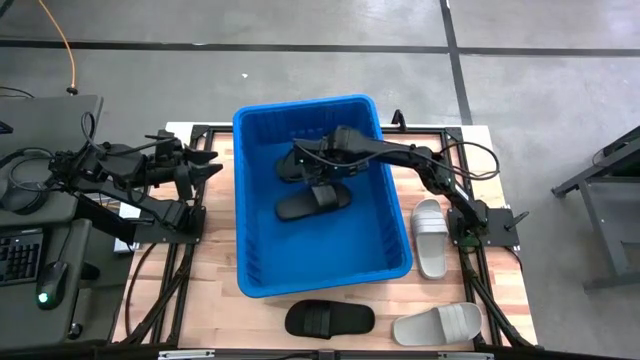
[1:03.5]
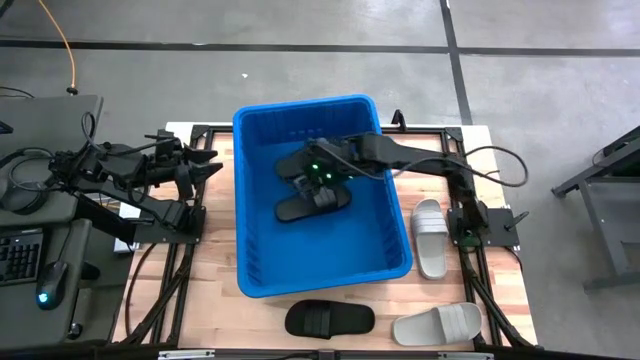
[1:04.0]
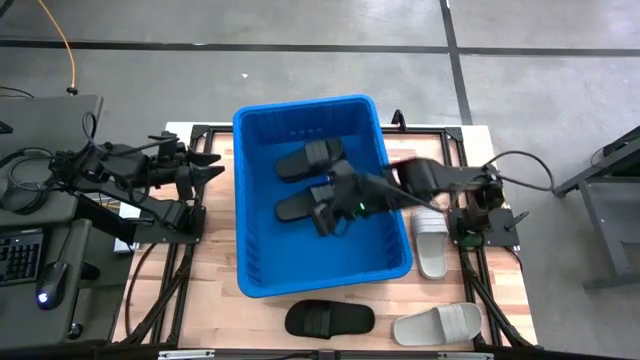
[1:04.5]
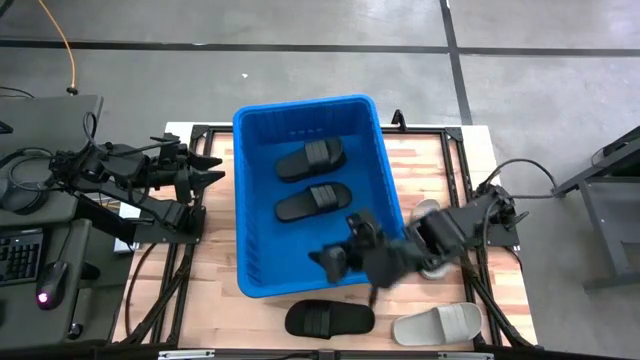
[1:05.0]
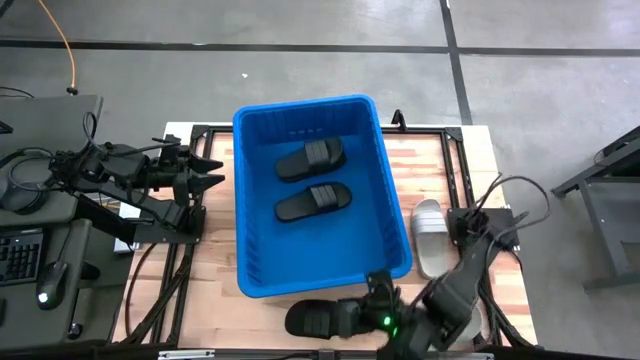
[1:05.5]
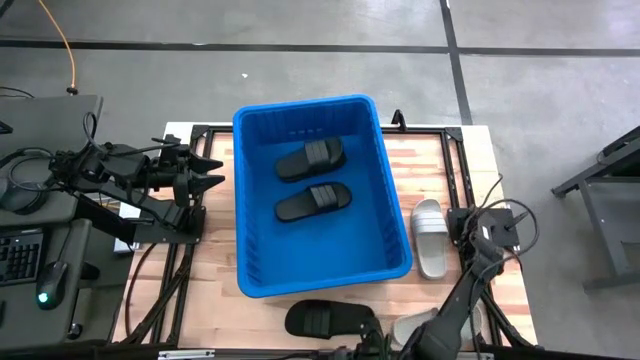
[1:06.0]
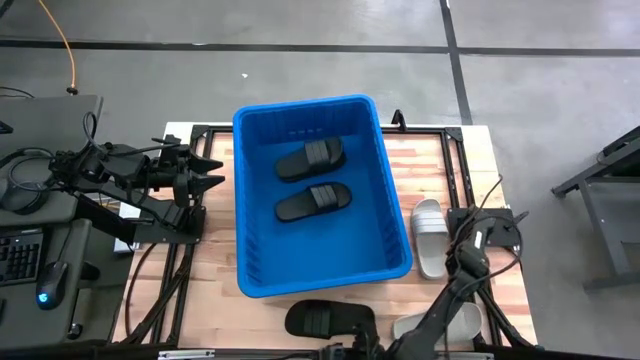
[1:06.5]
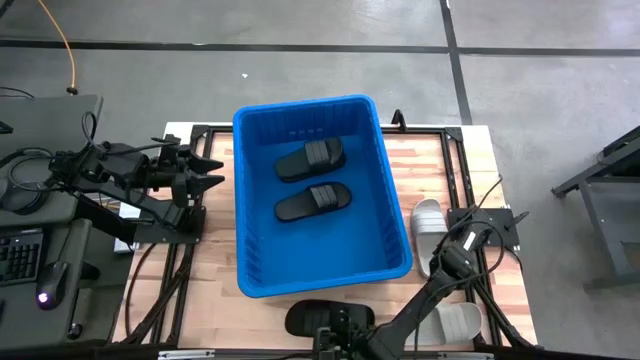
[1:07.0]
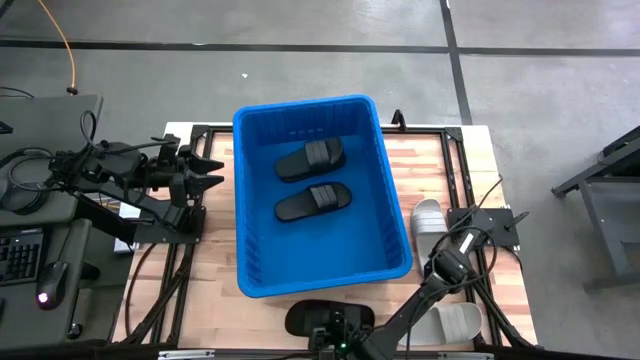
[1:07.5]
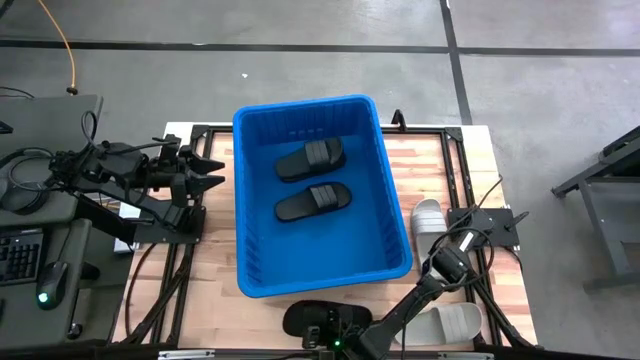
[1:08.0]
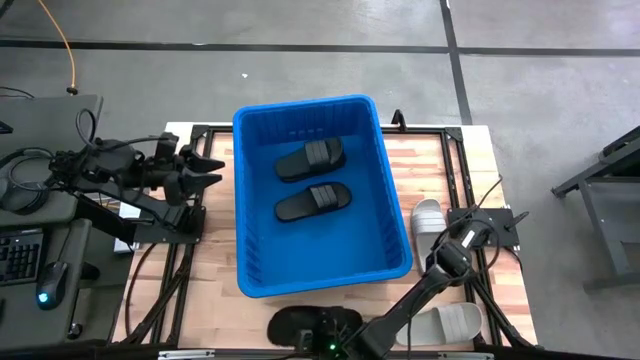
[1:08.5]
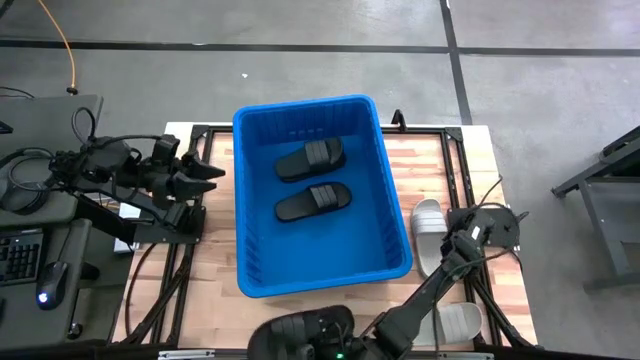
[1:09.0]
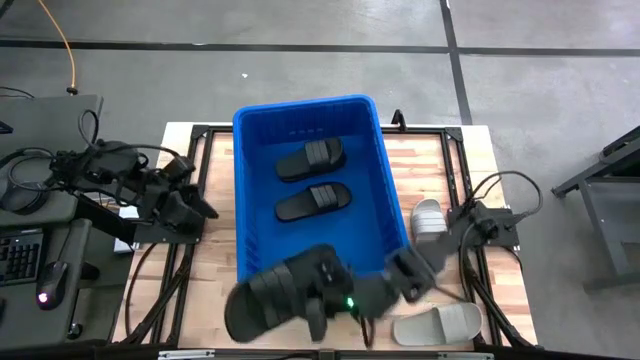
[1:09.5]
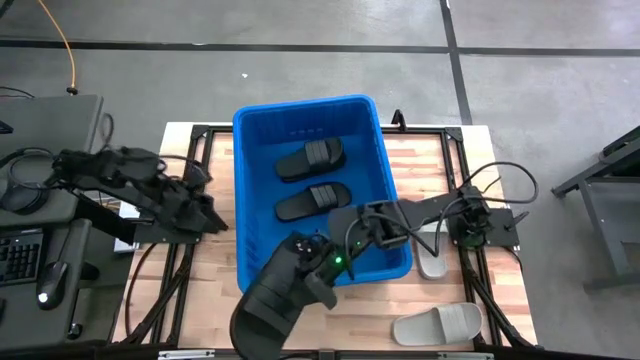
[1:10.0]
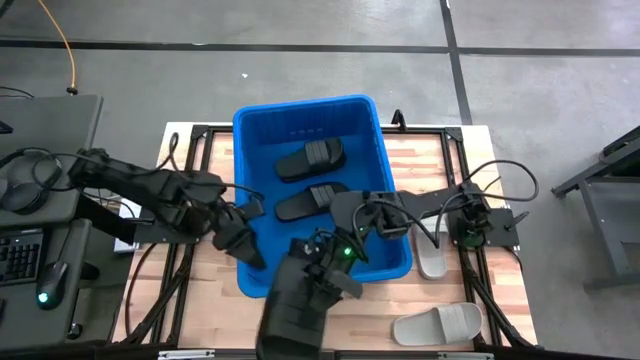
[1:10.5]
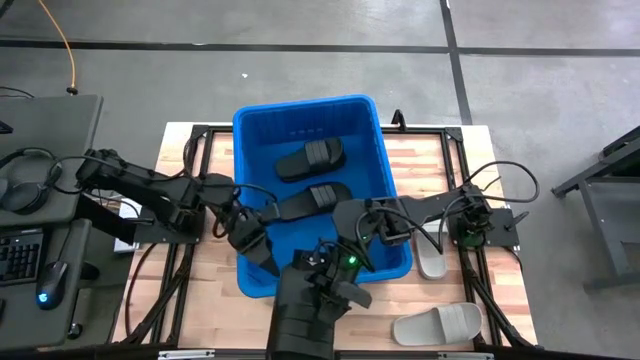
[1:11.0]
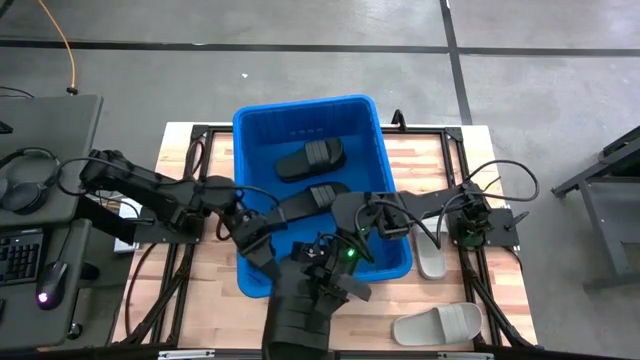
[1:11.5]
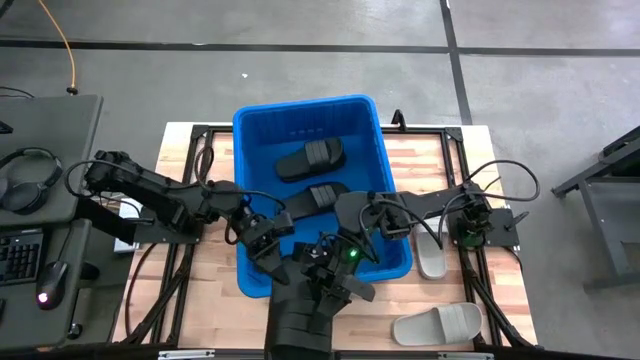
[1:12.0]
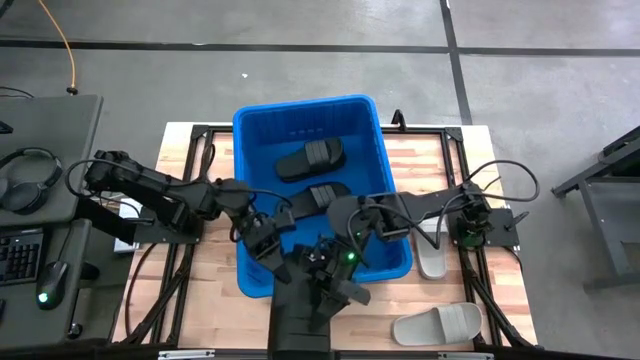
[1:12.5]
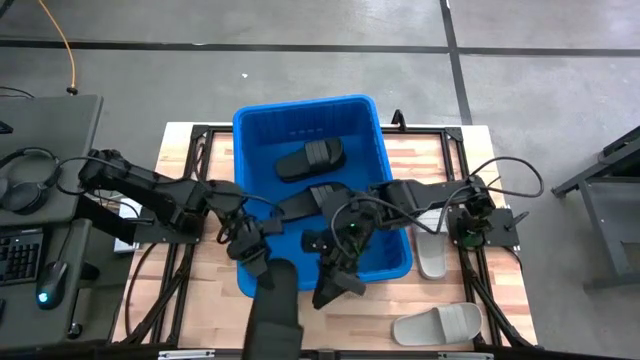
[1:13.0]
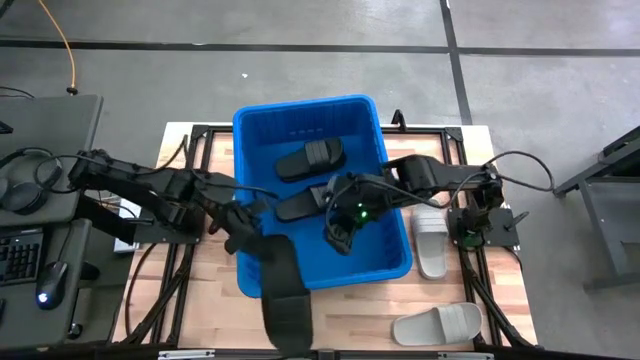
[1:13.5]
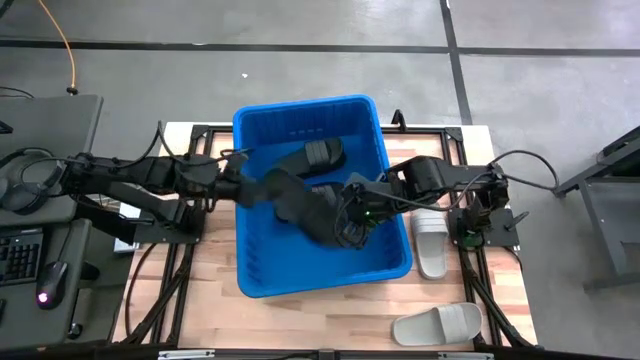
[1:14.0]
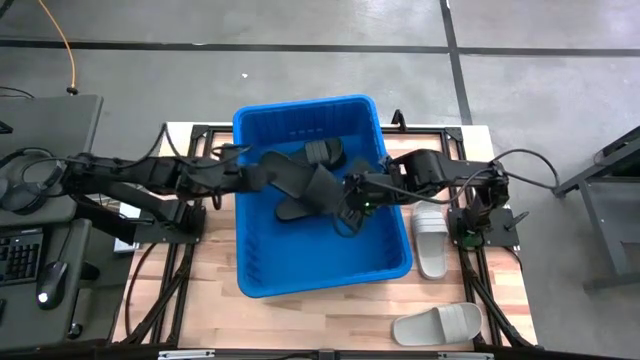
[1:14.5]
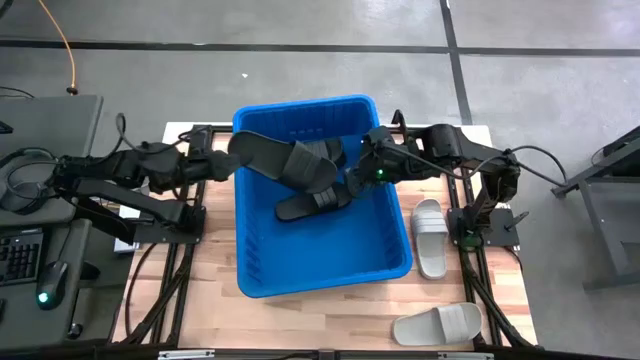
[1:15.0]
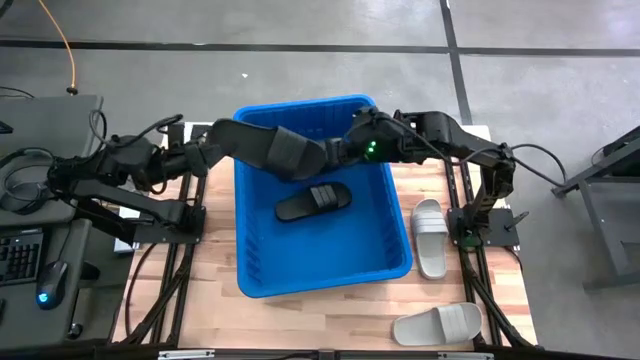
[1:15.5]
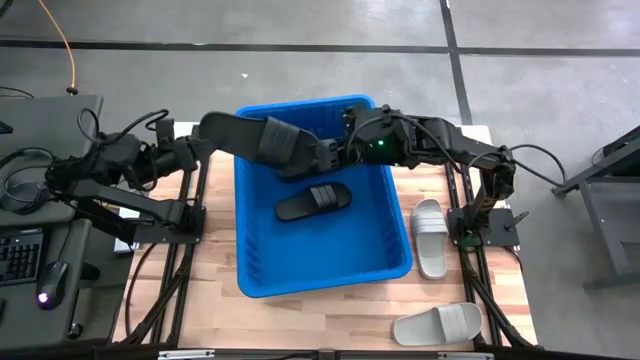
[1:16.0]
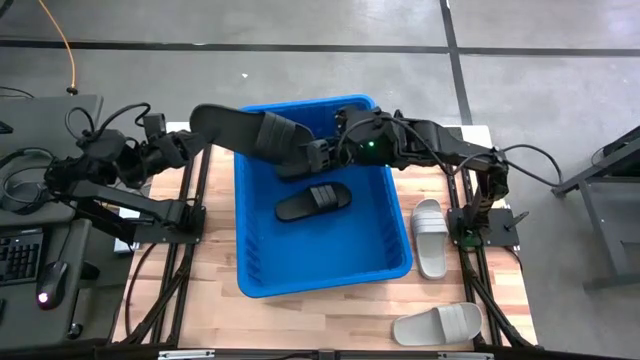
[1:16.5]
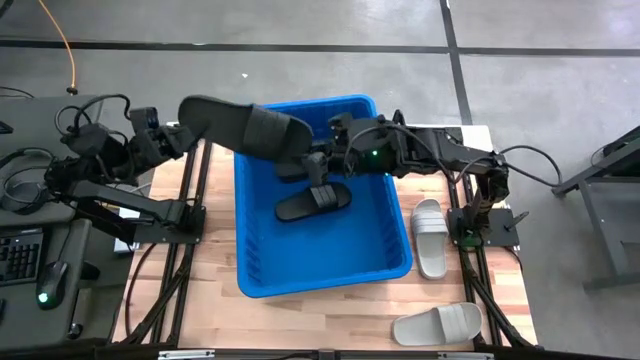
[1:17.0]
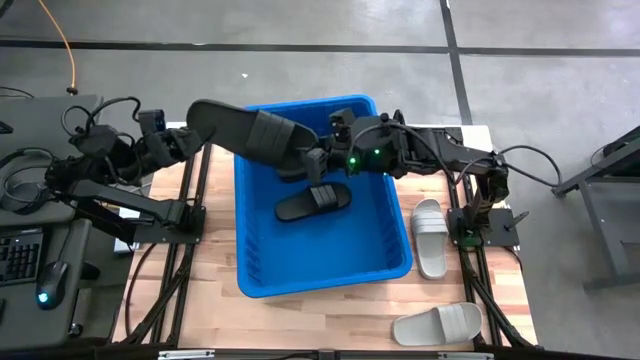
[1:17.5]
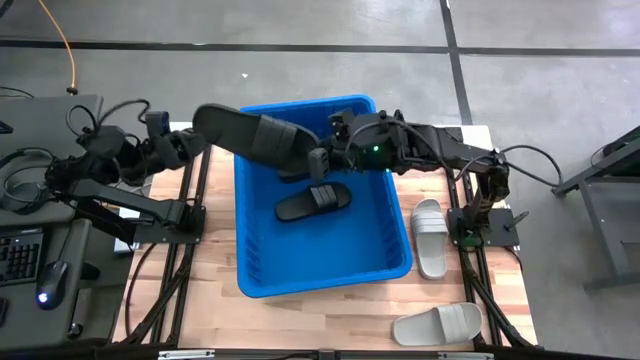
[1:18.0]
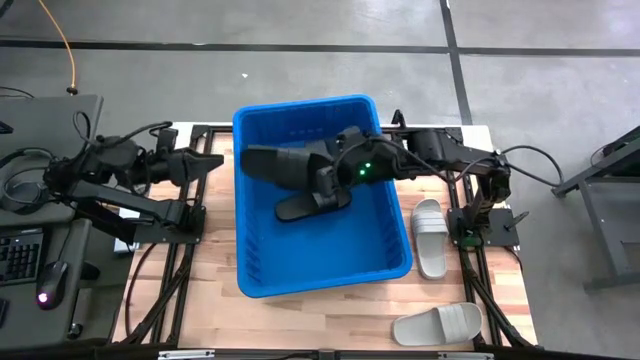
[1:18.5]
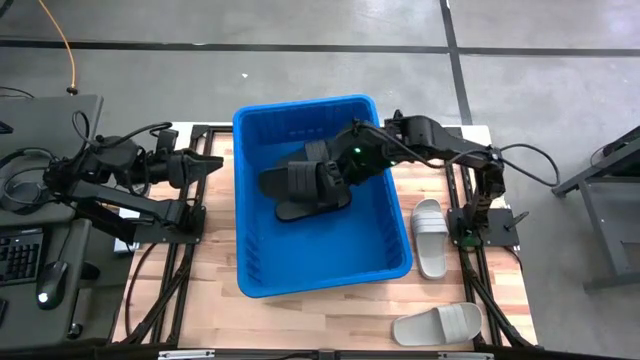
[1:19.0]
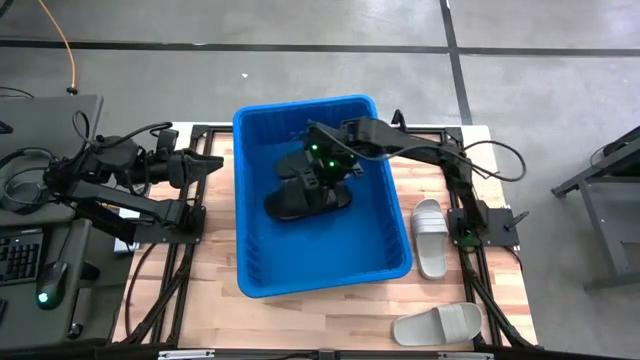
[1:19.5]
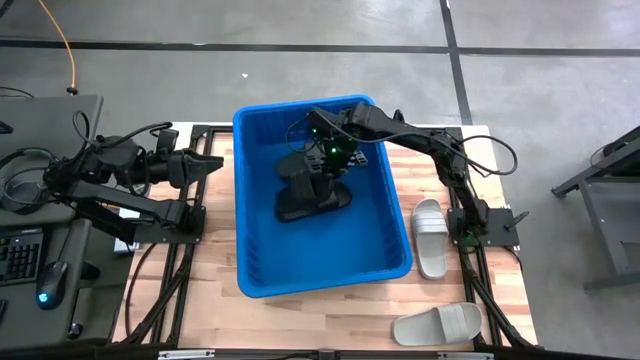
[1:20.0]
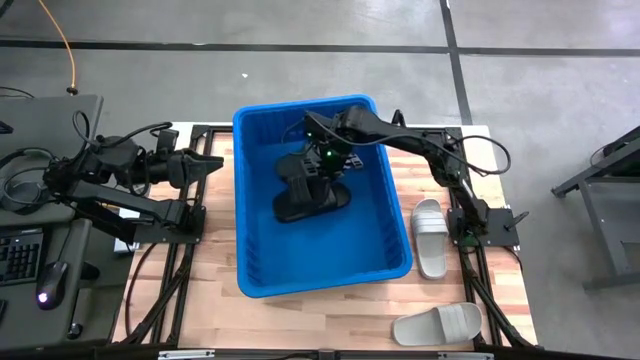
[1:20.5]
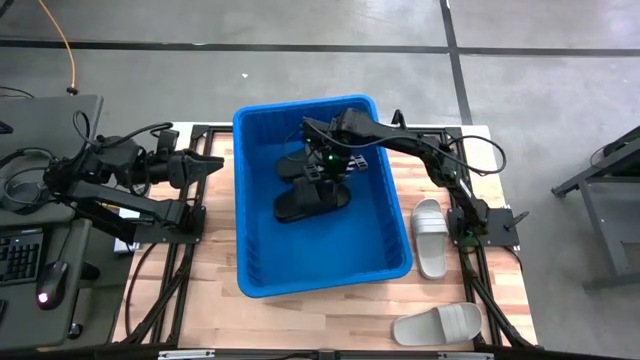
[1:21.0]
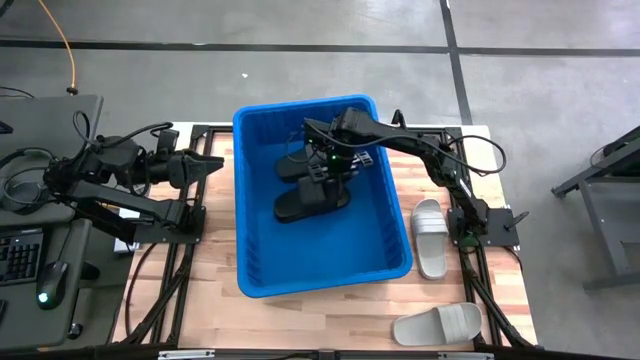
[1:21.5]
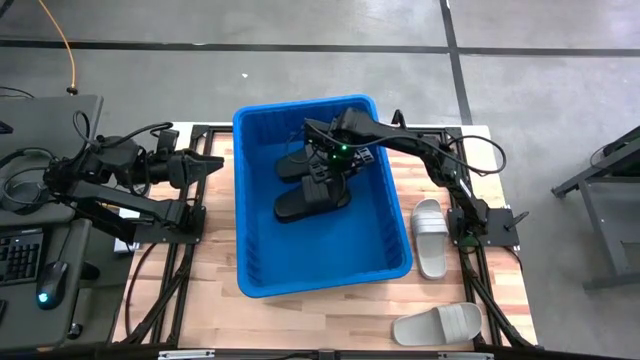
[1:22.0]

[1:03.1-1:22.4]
Task: Pick and place slides into bin
Put the black slide into the blue container

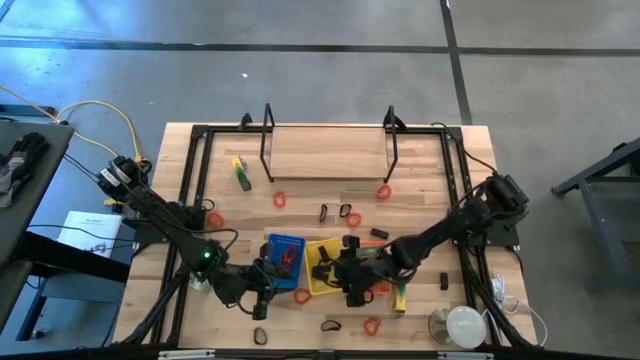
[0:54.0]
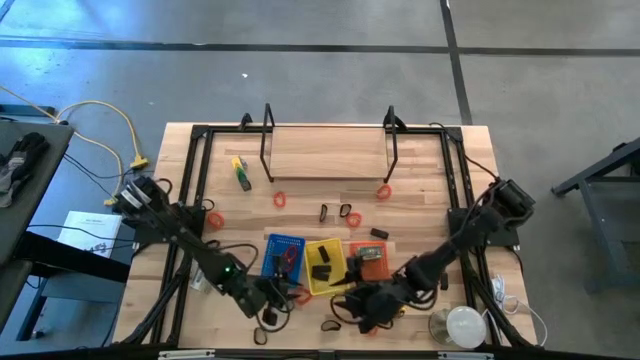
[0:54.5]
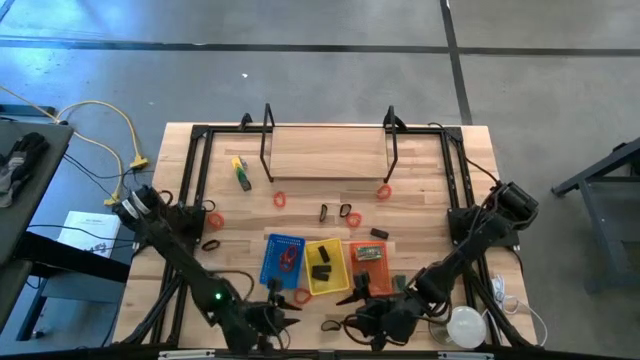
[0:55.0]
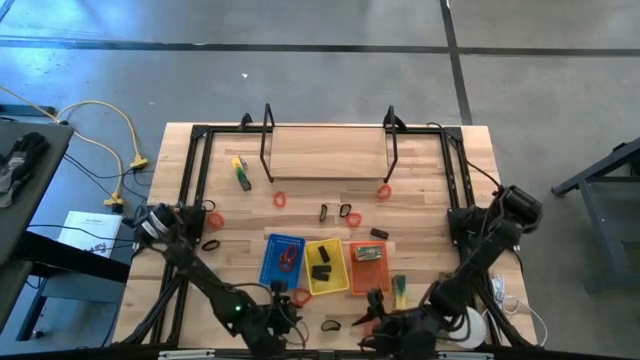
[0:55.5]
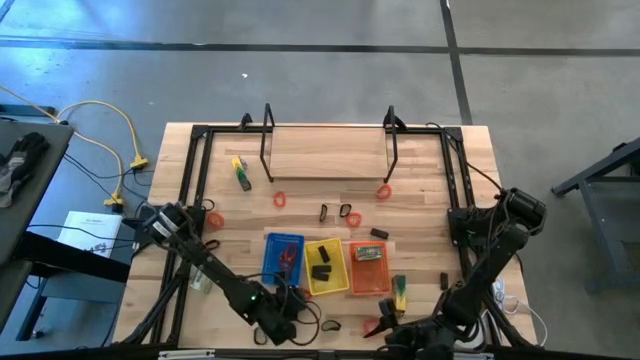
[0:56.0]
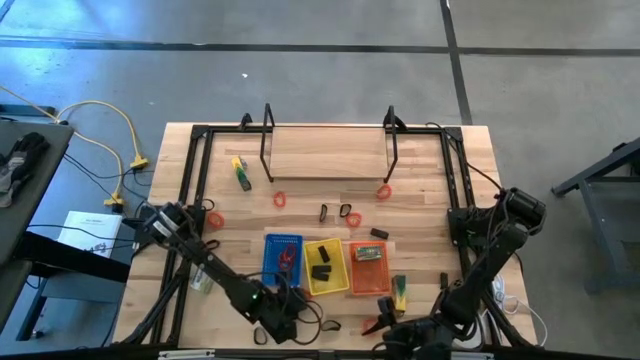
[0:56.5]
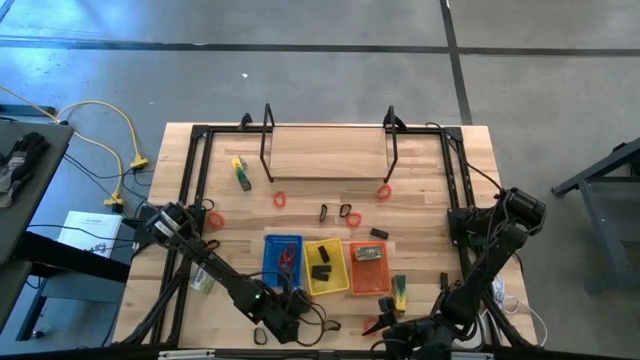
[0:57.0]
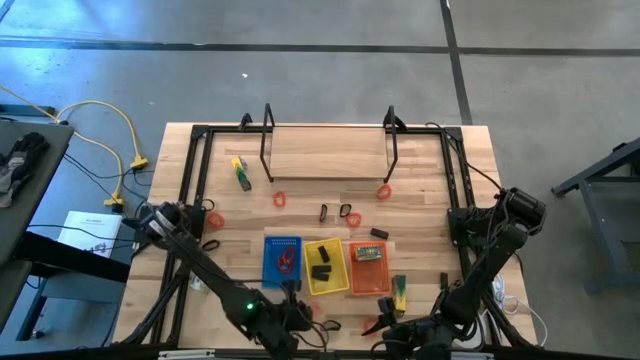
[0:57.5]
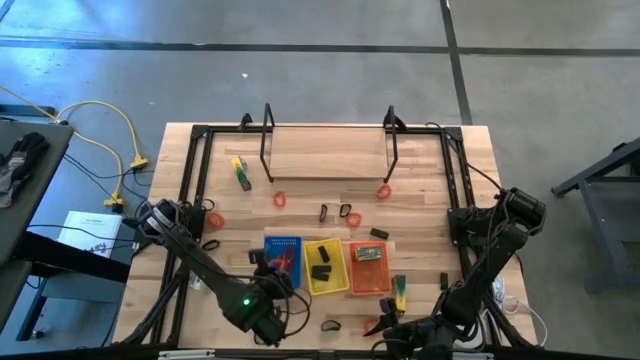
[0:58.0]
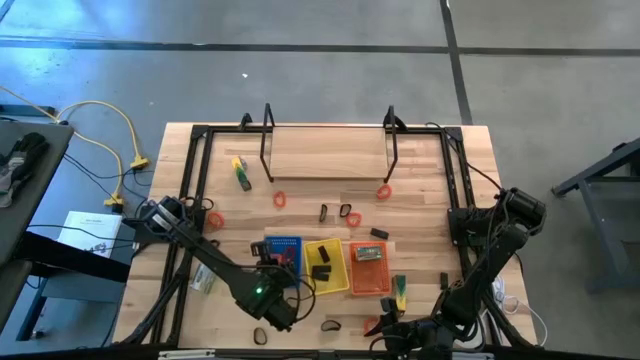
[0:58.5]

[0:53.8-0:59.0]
Task: Pick & Place Office Desk Supplies
Put the orange spring keychain into the blue basket
